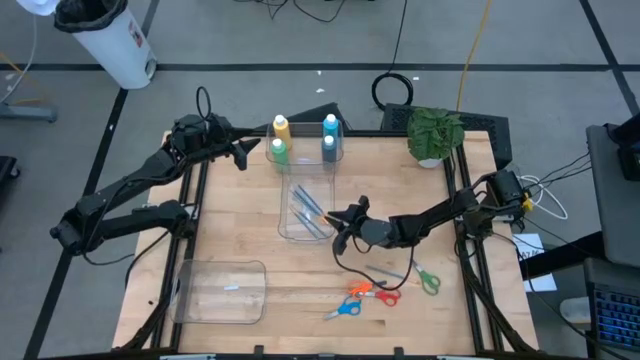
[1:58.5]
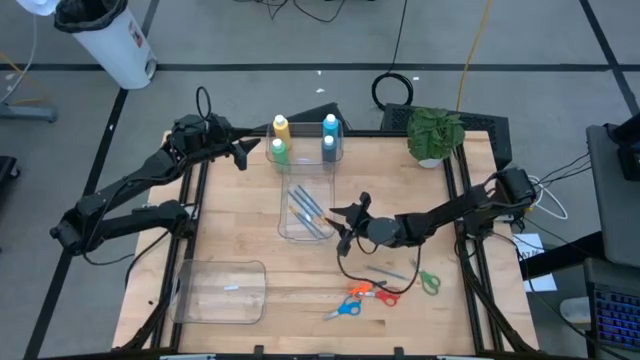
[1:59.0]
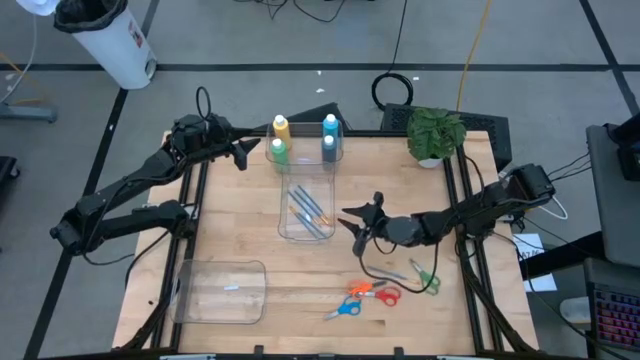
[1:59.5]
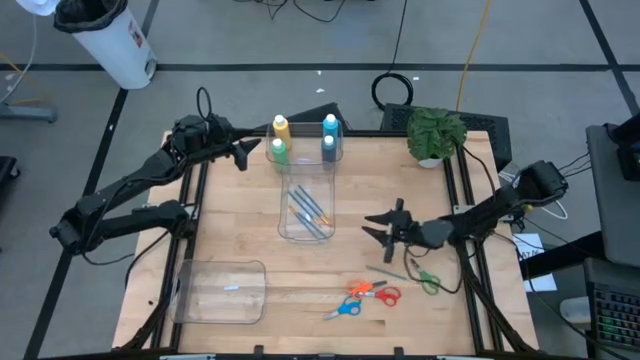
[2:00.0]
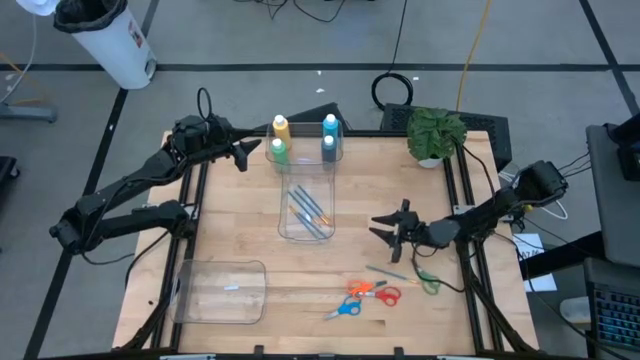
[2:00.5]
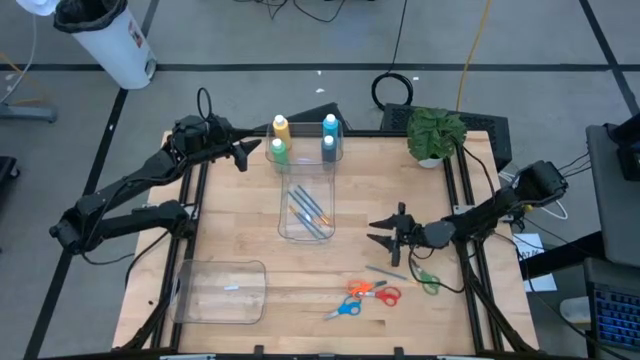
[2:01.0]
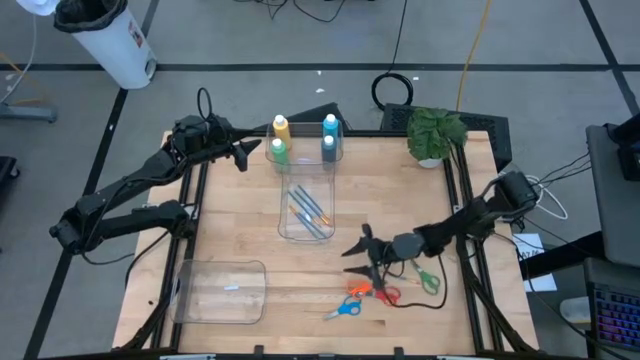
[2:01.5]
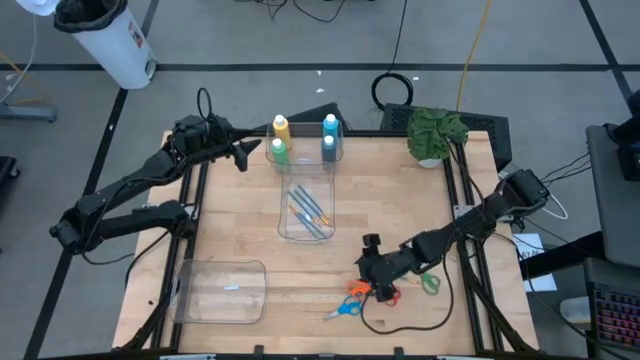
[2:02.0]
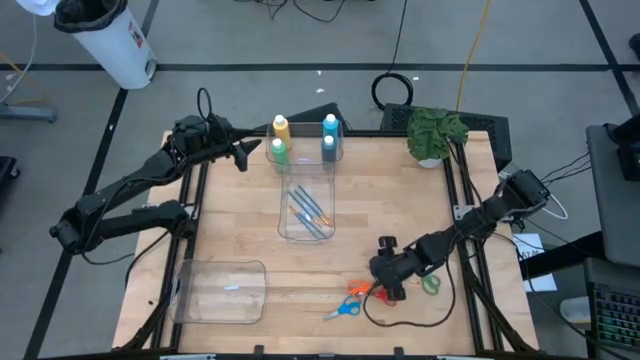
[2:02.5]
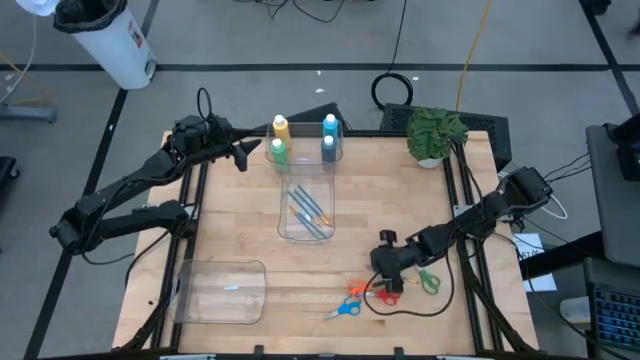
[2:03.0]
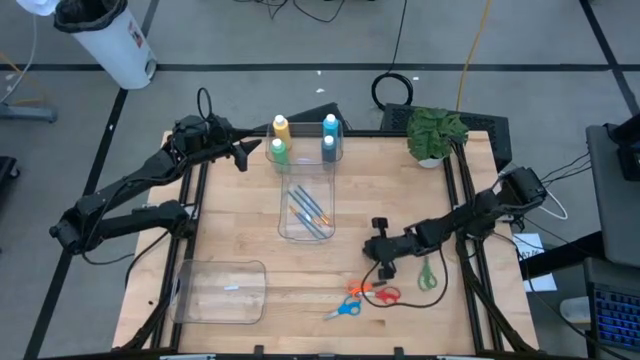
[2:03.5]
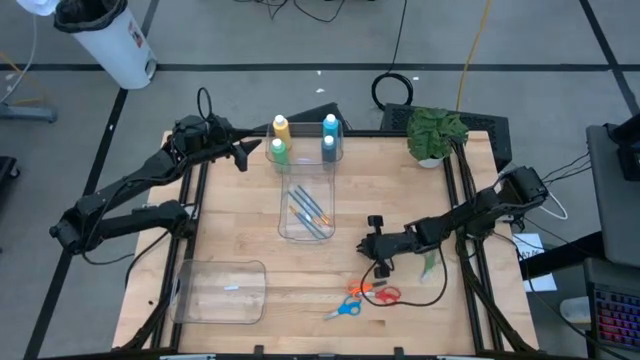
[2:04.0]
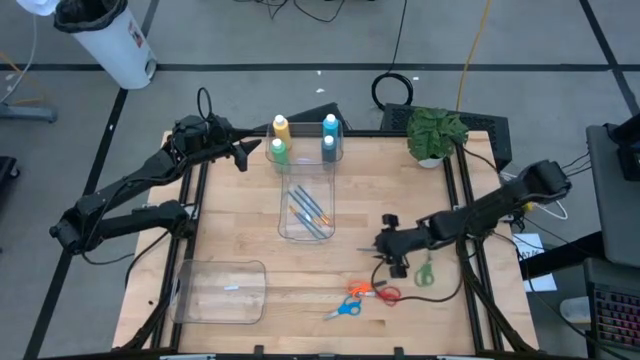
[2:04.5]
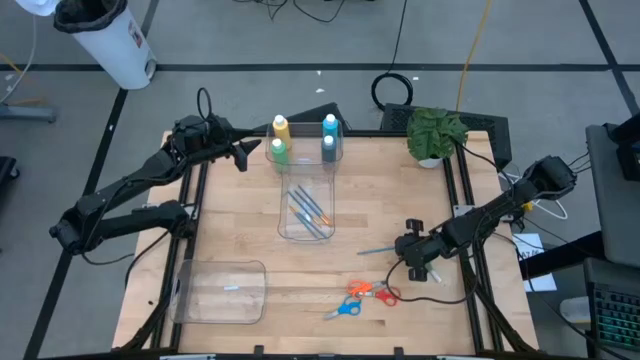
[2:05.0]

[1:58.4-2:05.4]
Task: Pick & Place Paint Supplies
Put the blue paintbrush into the middle transparent bin

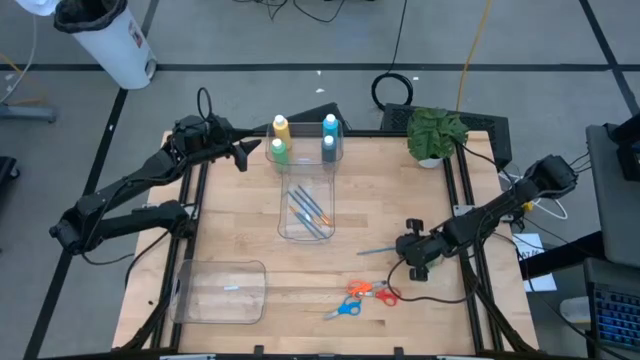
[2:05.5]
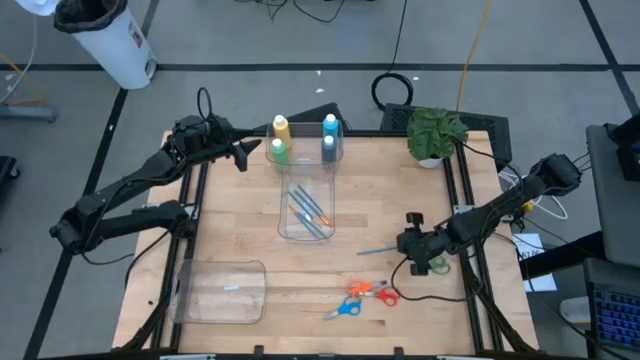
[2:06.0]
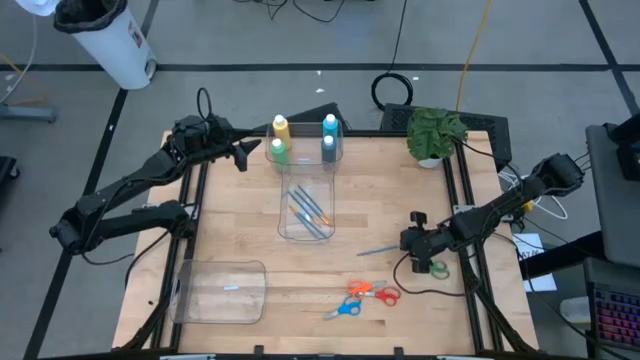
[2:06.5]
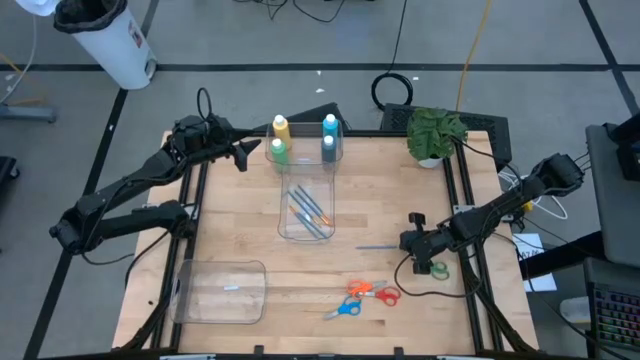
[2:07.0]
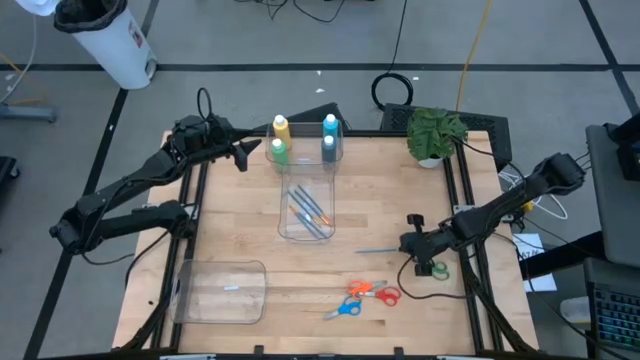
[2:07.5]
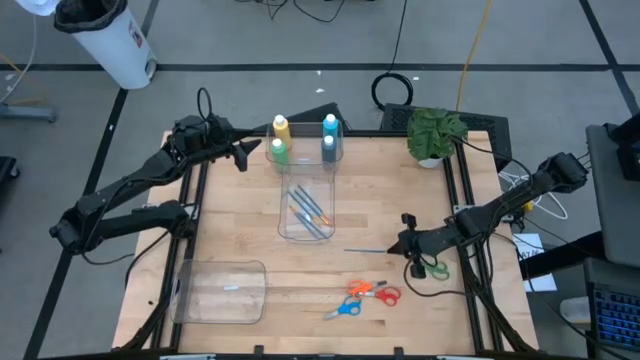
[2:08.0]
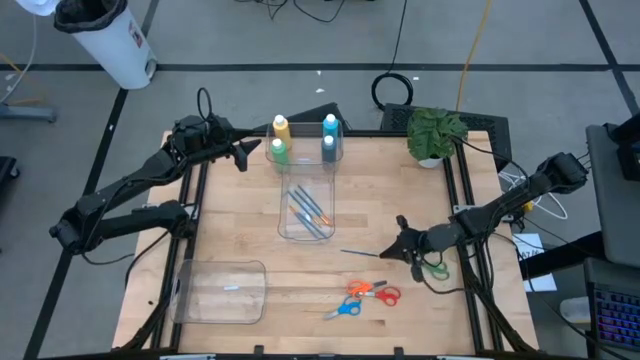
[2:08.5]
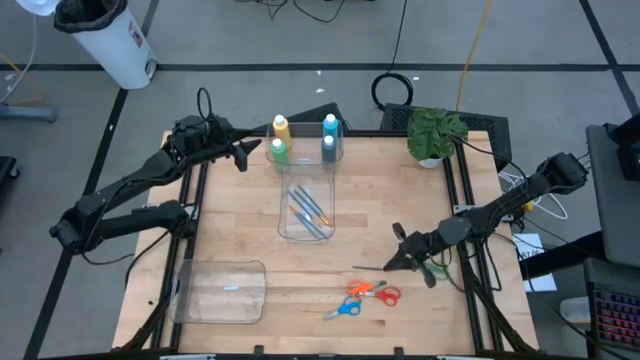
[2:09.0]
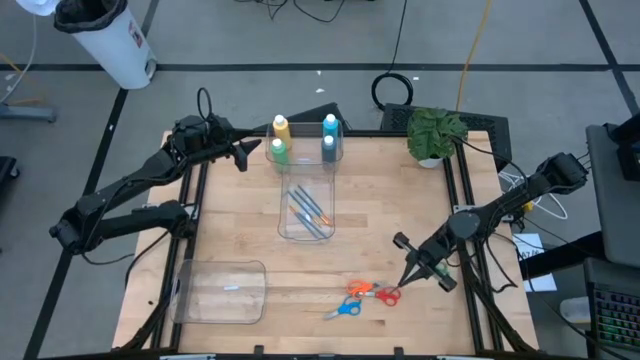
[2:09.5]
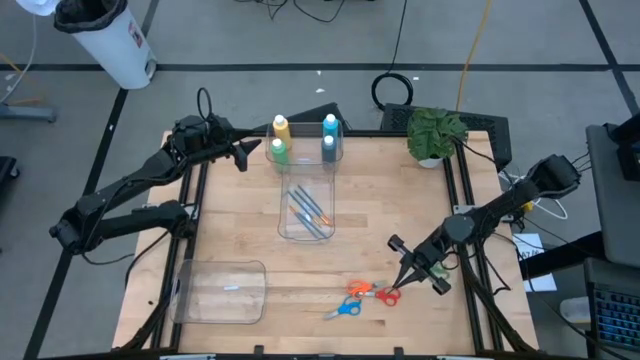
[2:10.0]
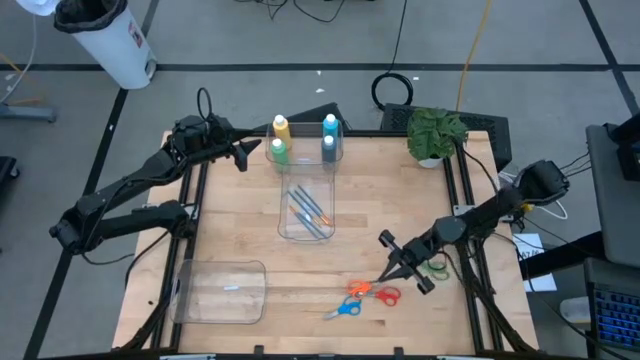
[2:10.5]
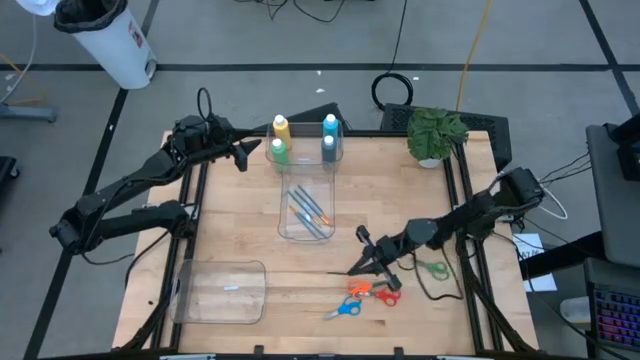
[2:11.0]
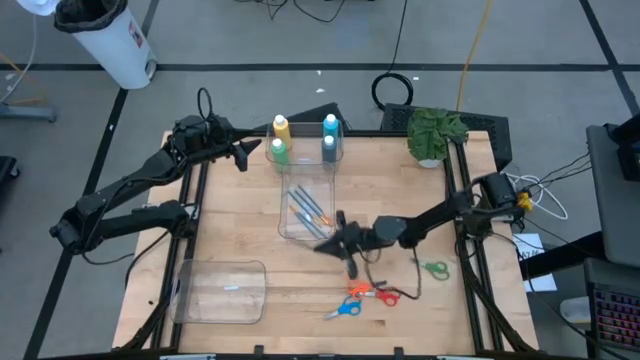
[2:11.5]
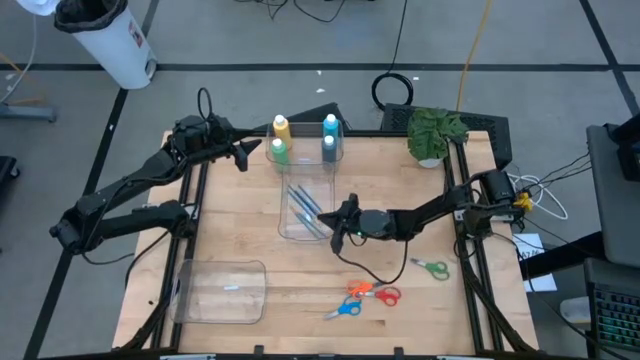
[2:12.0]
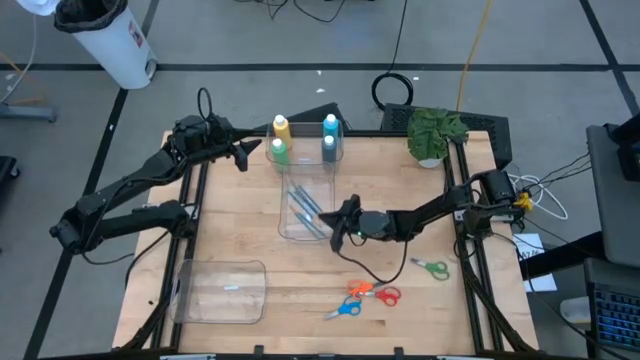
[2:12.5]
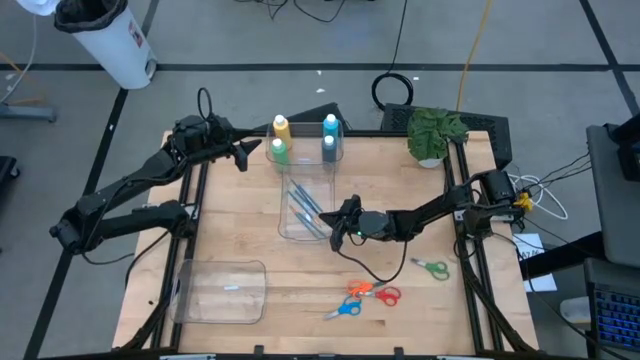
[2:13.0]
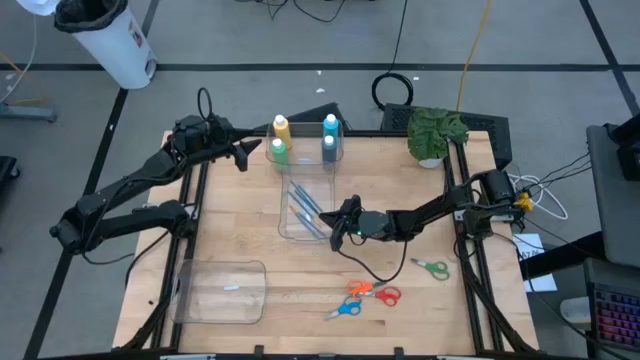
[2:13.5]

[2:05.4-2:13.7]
Put the blue paintbrush into the middle transparent bin

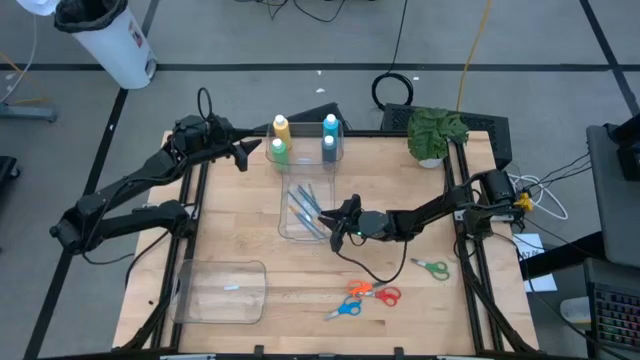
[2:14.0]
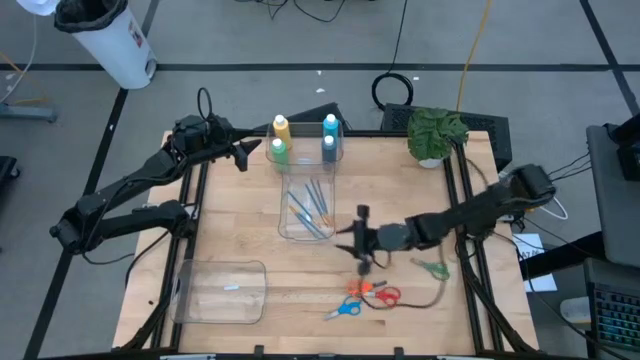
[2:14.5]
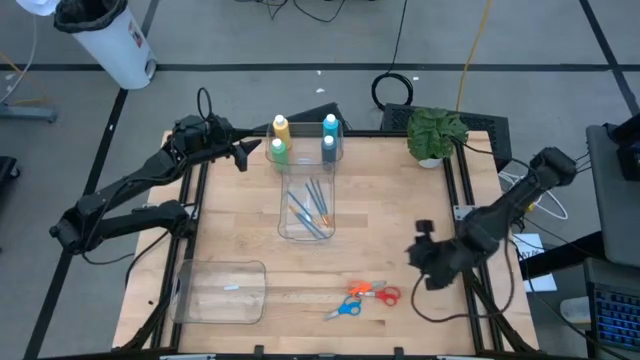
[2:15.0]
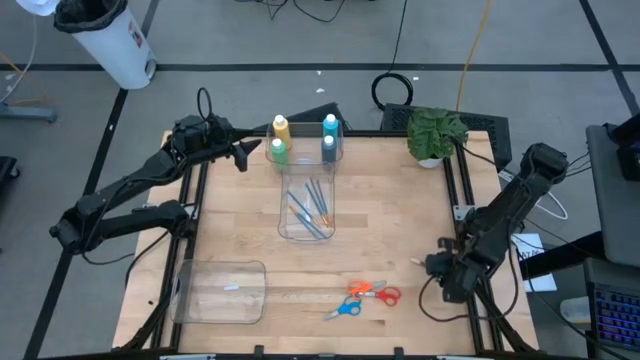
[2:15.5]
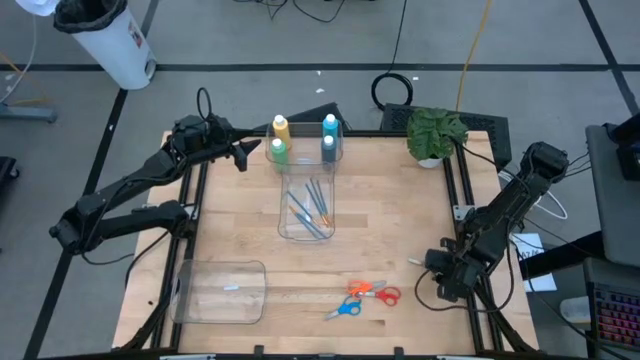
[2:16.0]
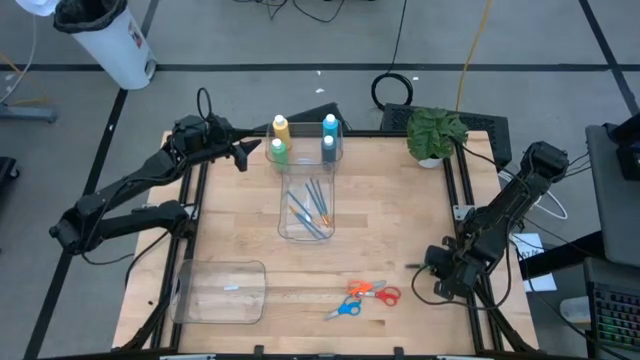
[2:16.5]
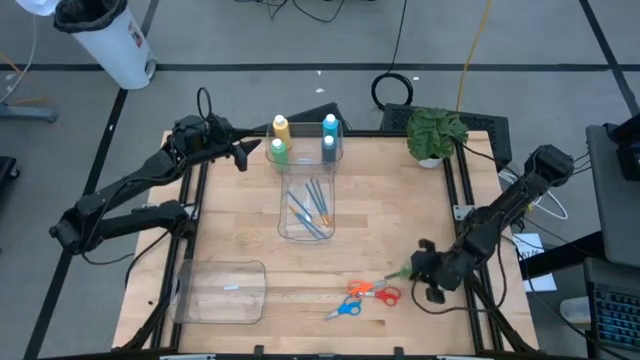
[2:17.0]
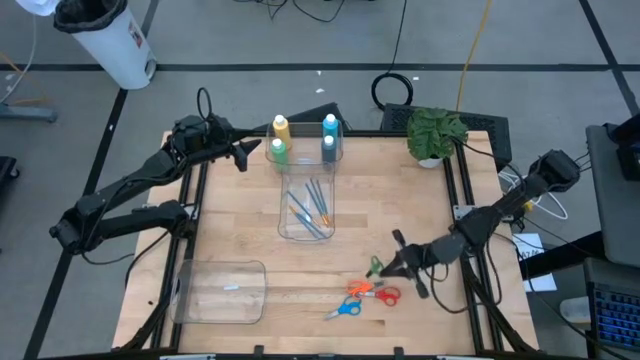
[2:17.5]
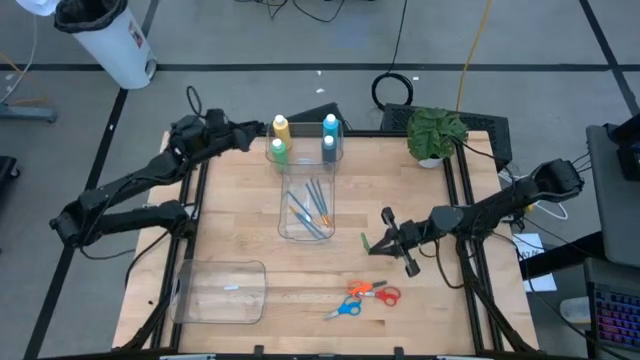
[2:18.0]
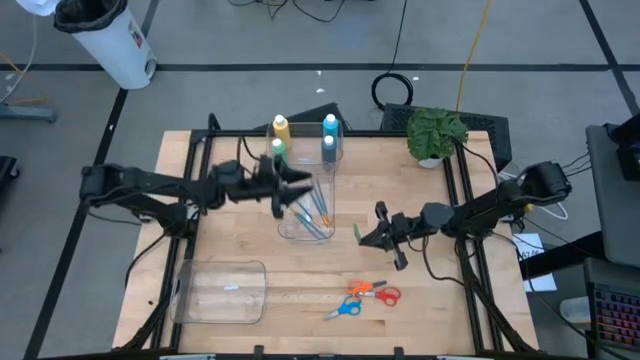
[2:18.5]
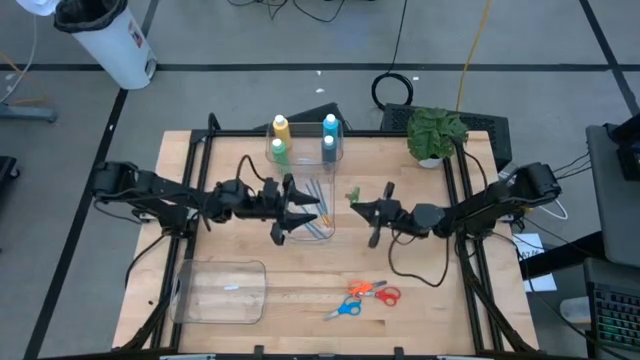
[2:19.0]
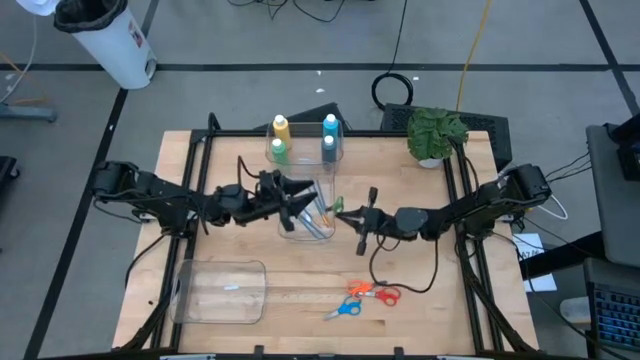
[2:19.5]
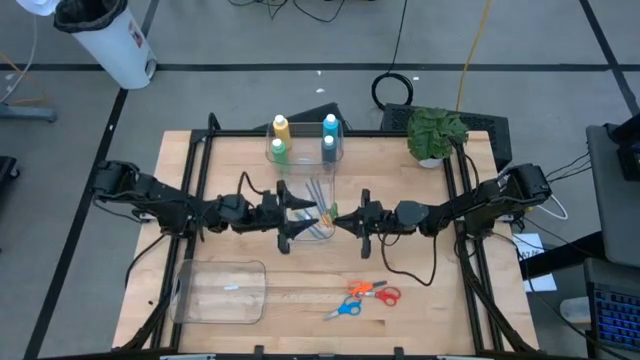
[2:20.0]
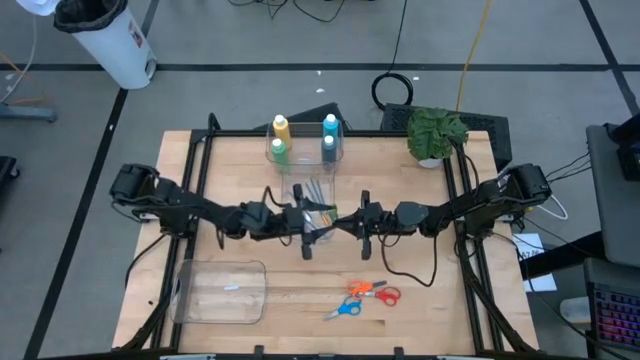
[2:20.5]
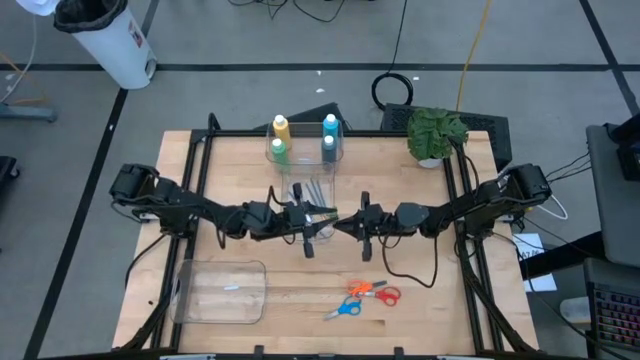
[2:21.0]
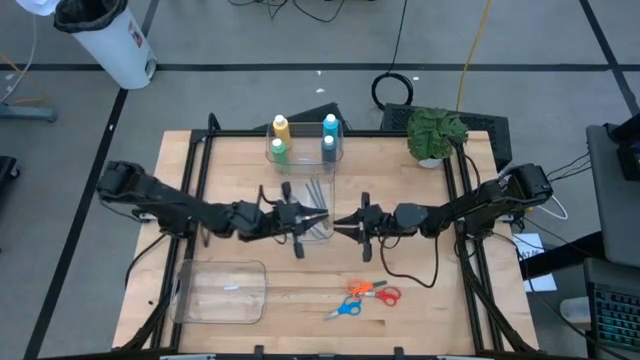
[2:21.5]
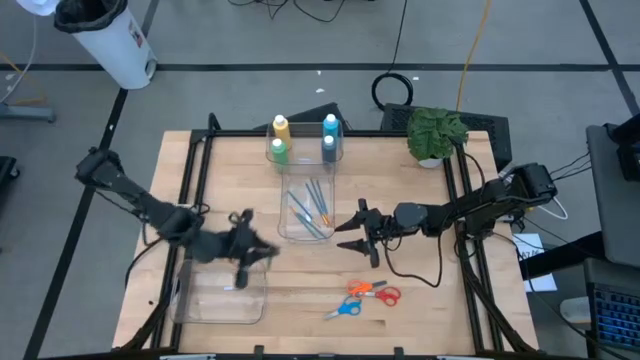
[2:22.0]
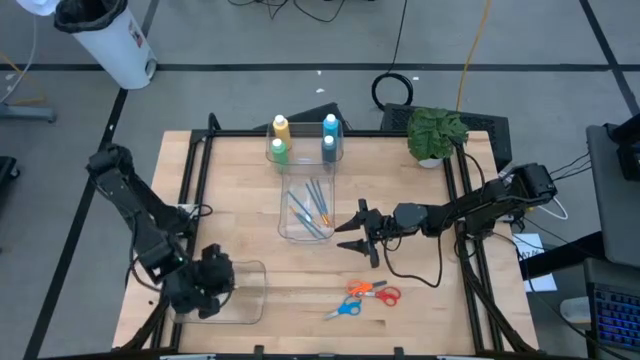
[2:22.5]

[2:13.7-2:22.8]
Put the green scissors into the bottom transparent bin
